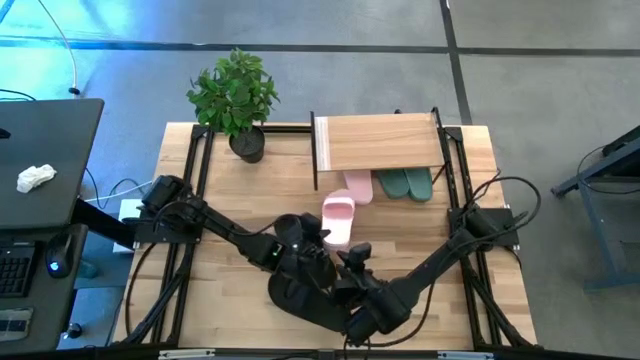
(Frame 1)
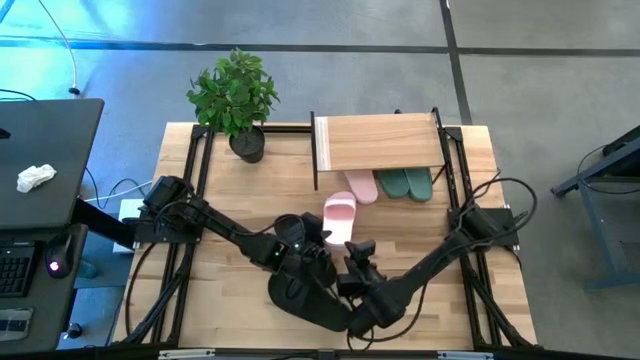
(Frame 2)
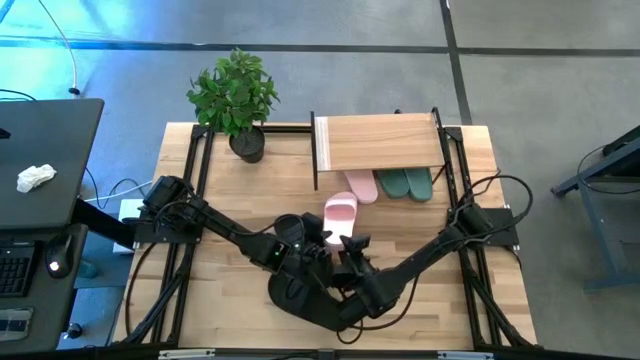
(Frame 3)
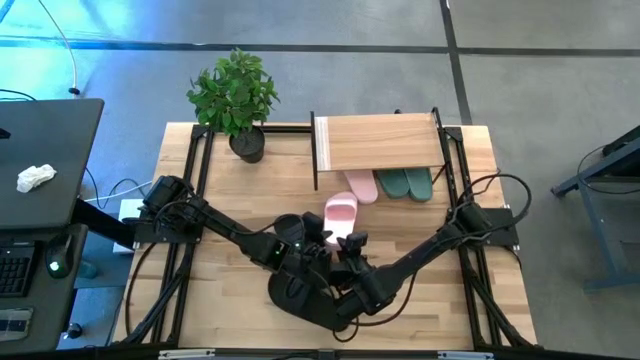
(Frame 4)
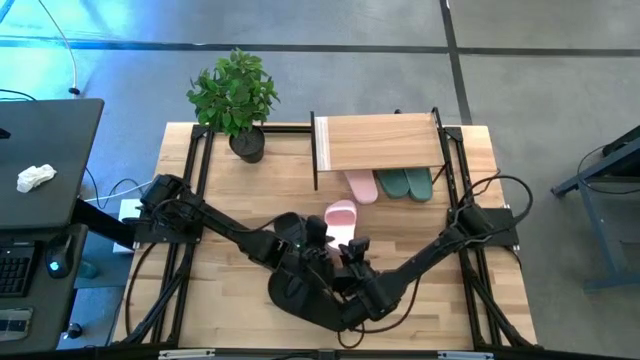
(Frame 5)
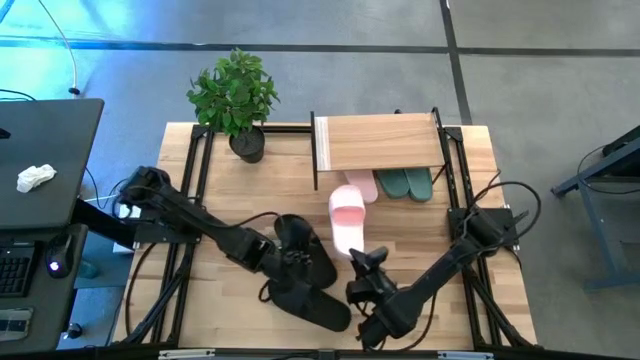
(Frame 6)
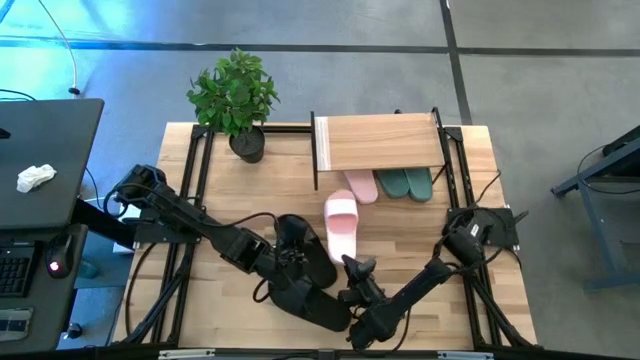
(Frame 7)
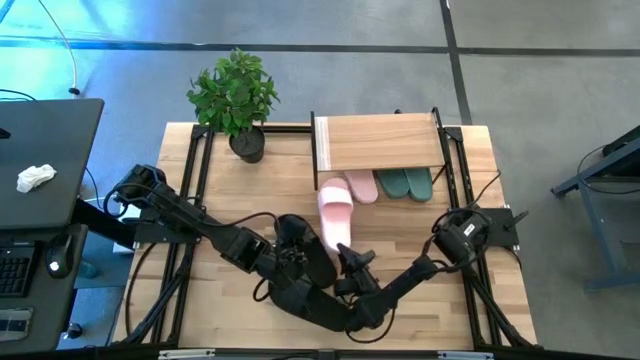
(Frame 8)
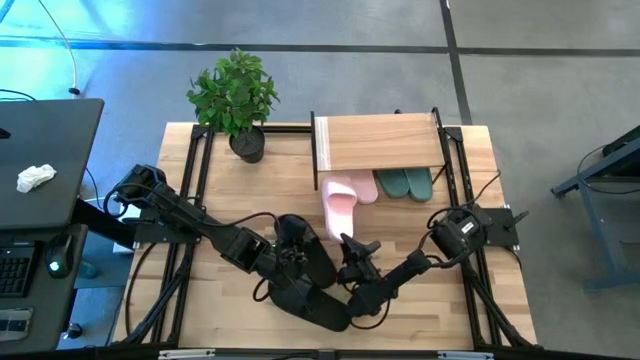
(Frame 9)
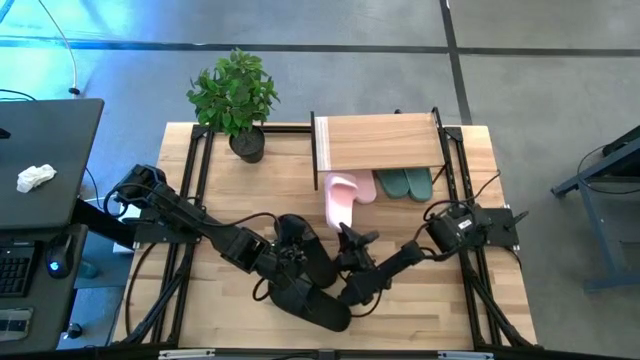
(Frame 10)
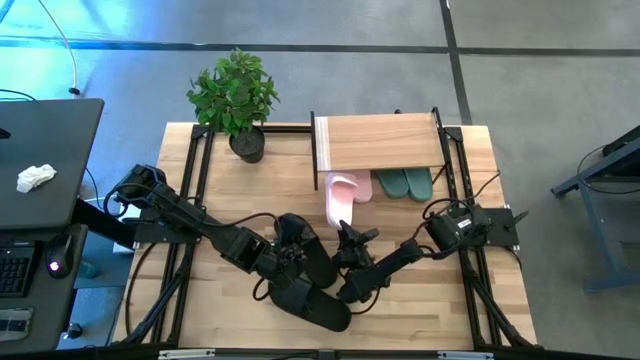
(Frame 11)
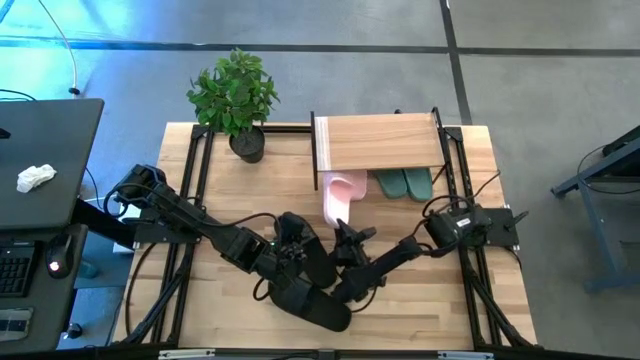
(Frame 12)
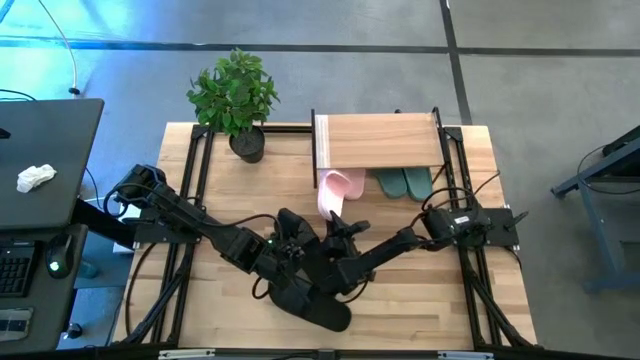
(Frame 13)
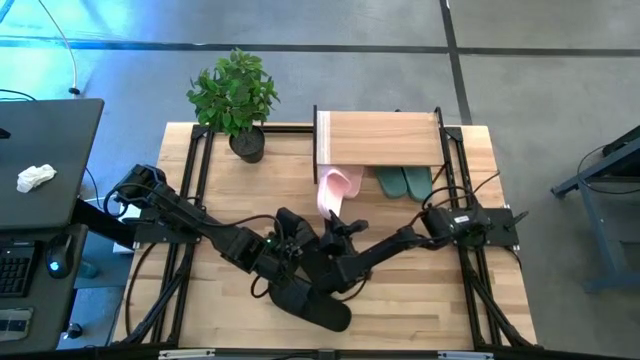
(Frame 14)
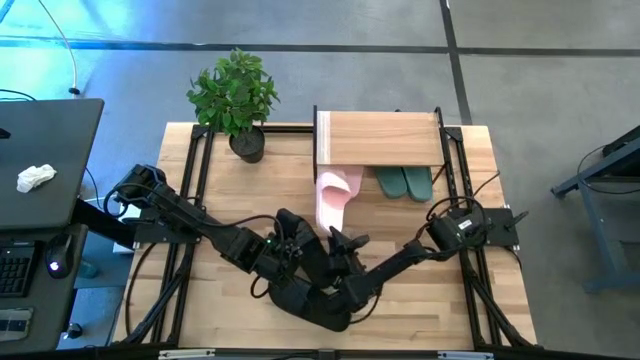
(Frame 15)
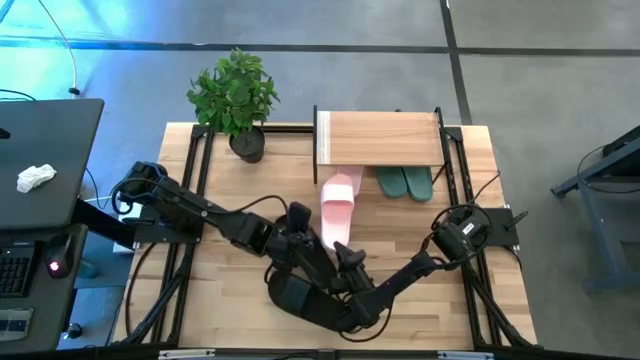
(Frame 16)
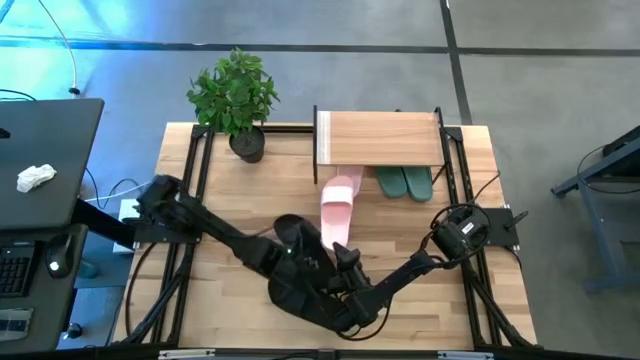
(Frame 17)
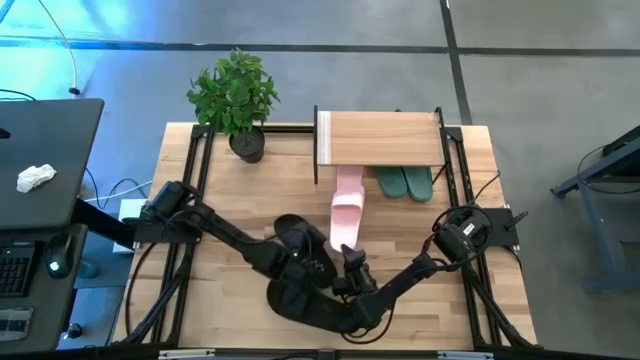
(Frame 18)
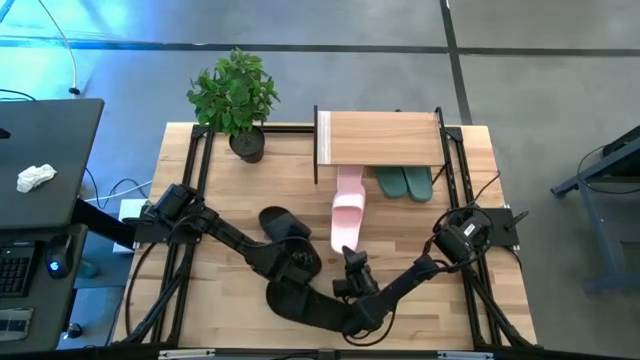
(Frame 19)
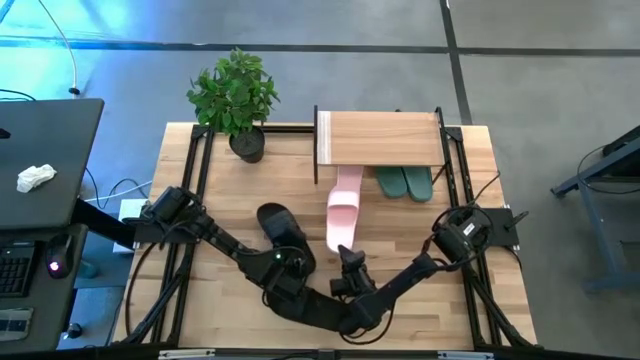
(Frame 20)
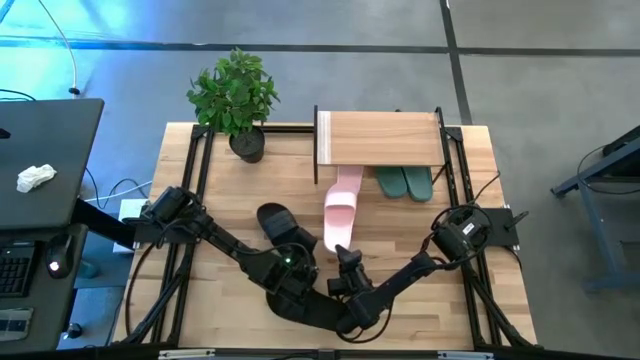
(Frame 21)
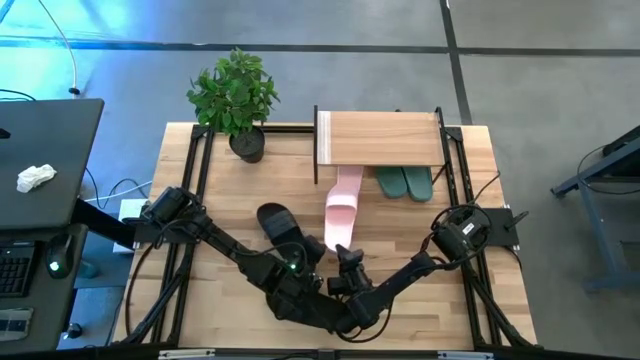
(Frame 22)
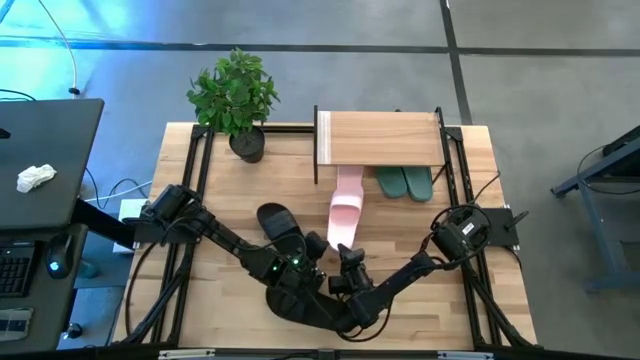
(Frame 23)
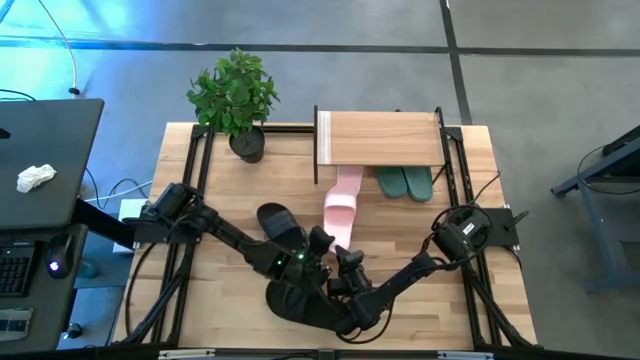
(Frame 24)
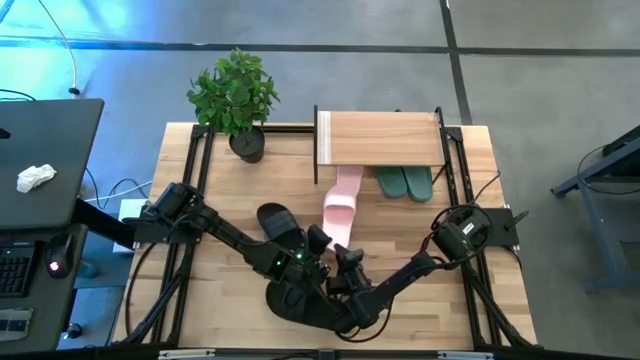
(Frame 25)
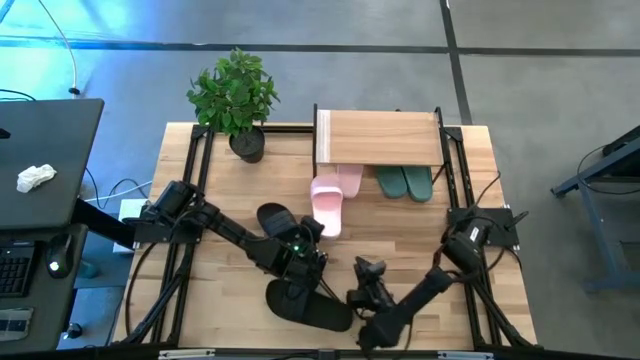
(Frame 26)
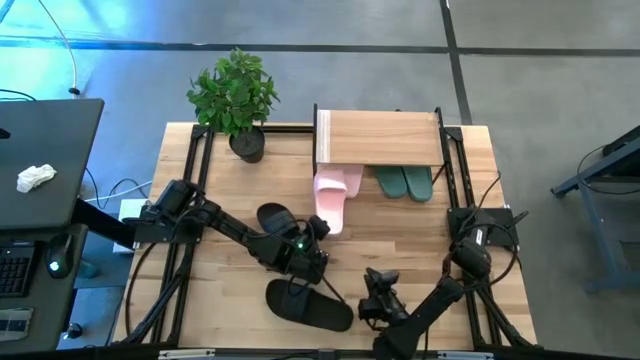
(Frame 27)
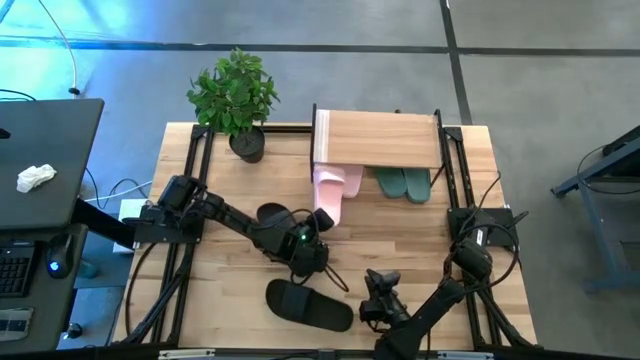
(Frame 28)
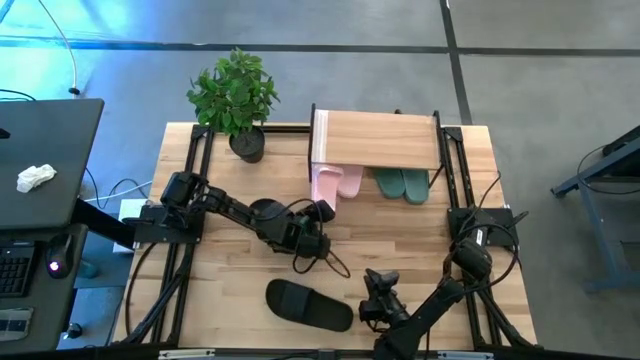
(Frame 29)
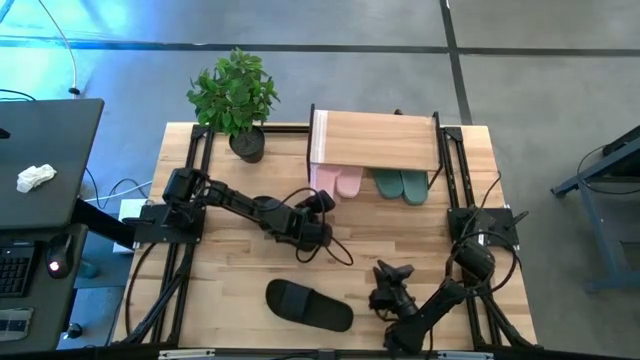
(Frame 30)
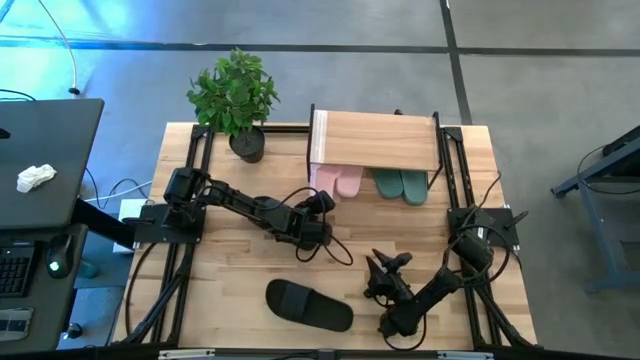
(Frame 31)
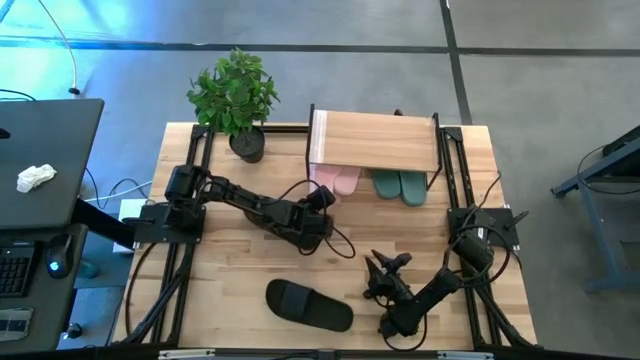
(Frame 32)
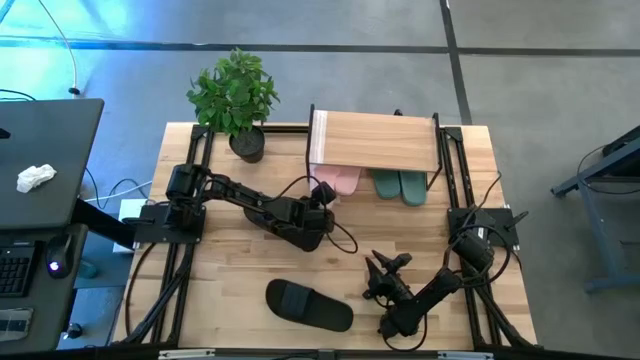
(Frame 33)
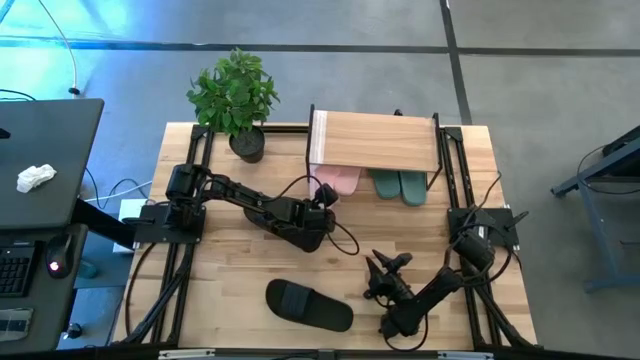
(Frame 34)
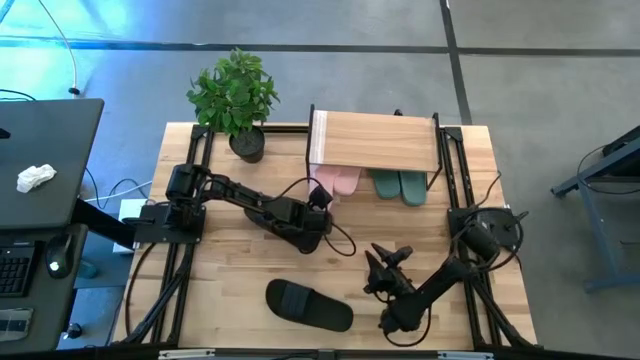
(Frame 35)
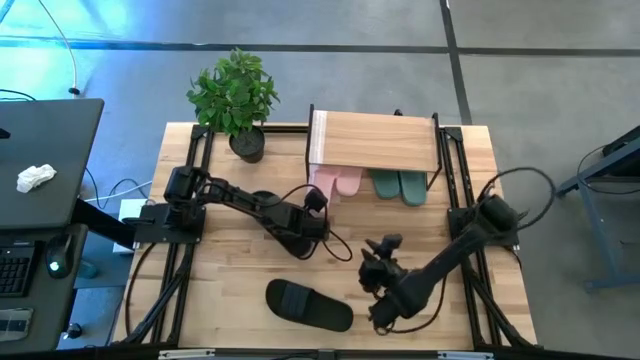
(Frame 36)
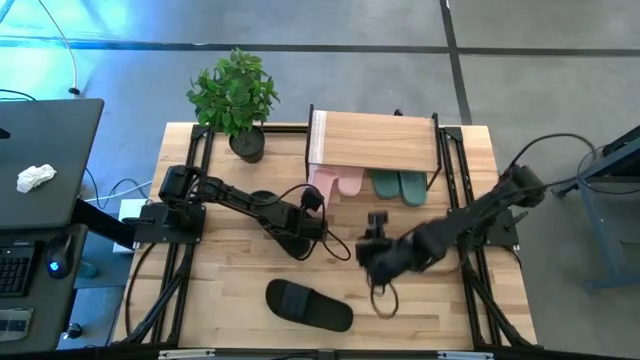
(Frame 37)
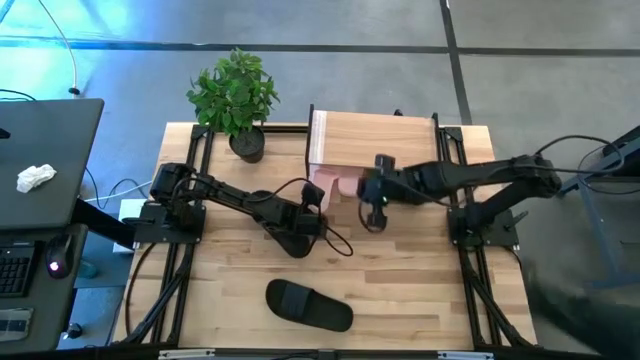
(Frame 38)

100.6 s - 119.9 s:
Task: Pick and place slides into the shelf
Put the pink slide under the shelf

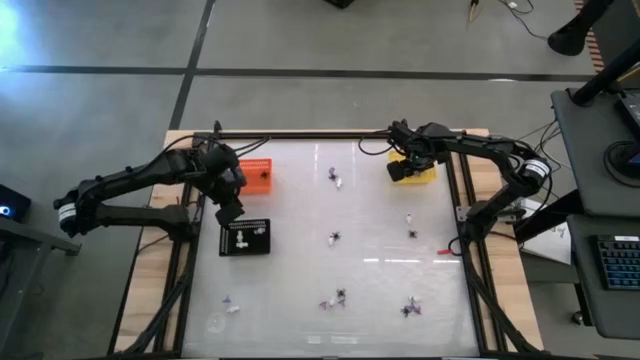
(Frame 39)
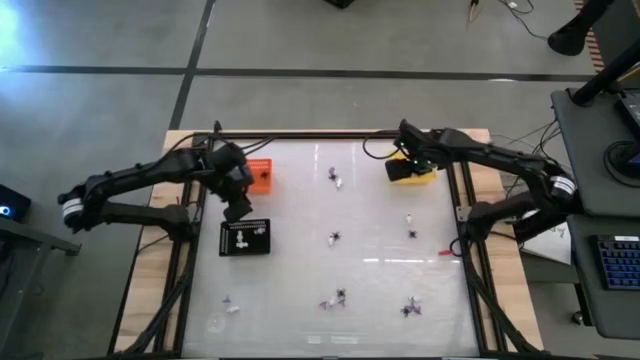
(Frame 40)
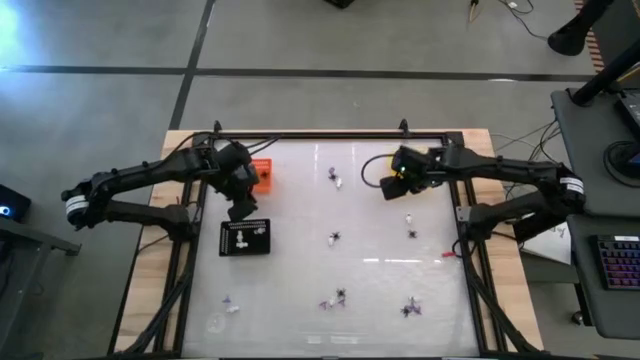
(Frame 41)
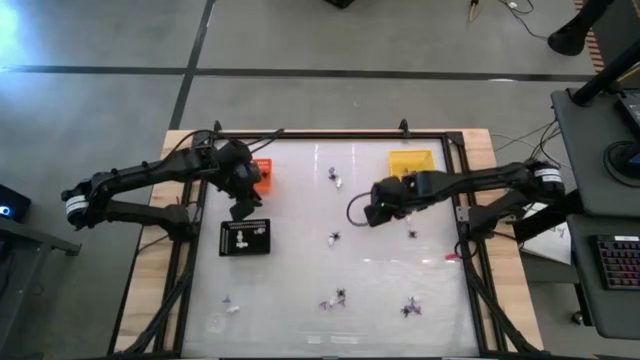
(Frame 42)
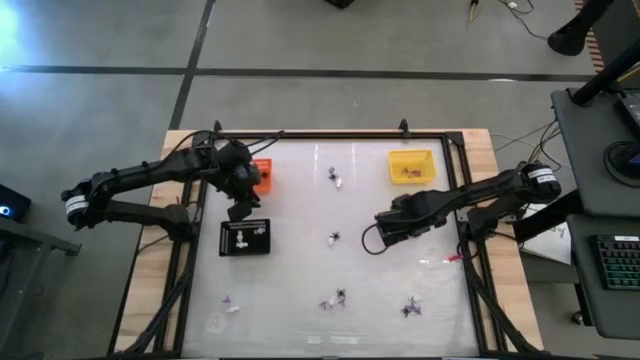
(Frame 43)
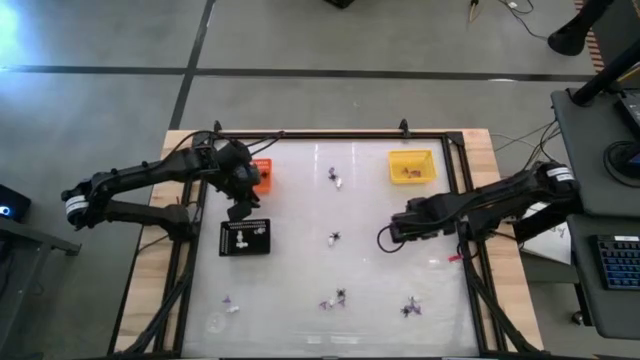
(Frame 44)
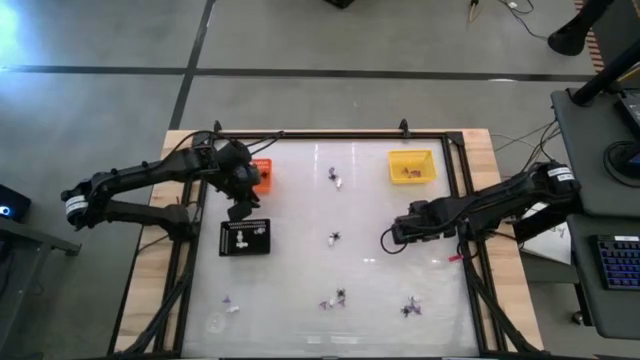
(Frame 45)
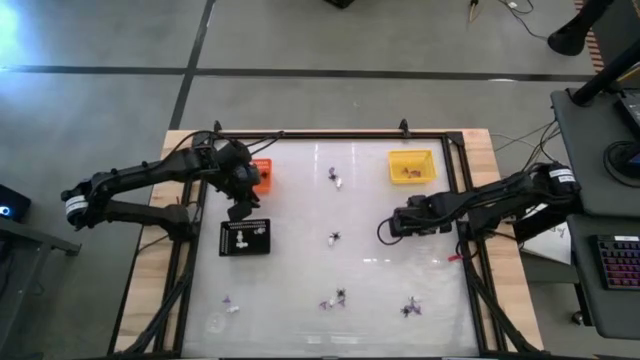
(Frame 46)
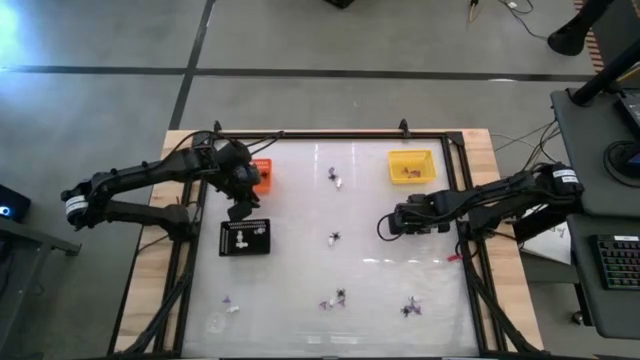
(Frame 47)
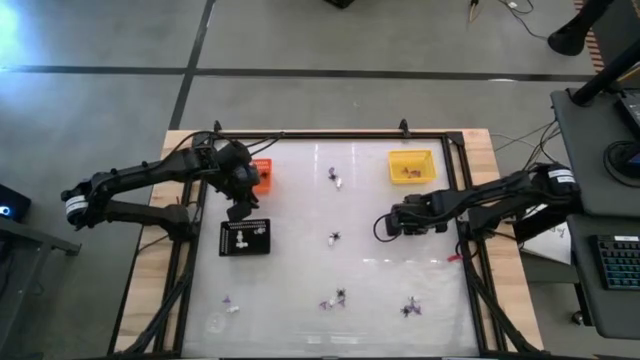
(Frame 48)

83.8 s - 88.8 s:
Task: Sort Halloween decoration
Put the black spider toy into the orange bin
